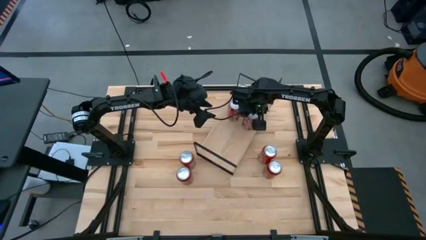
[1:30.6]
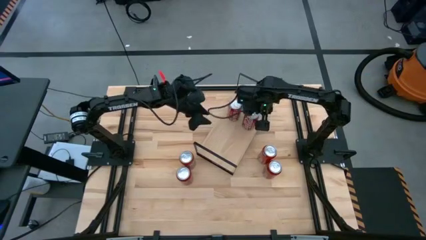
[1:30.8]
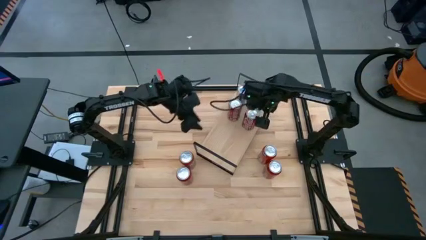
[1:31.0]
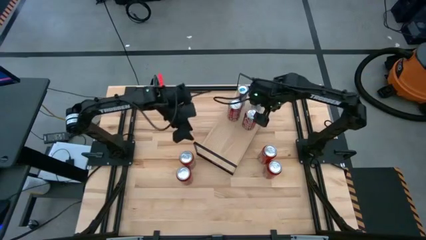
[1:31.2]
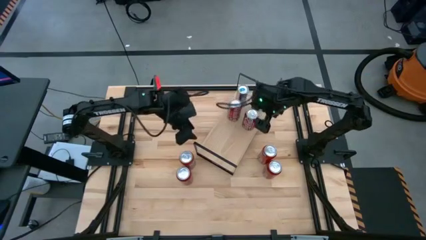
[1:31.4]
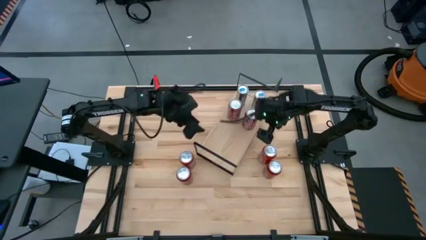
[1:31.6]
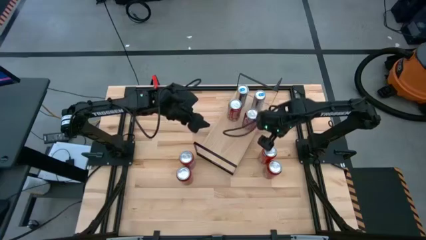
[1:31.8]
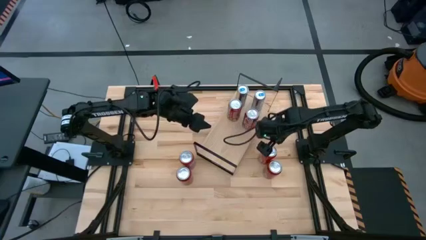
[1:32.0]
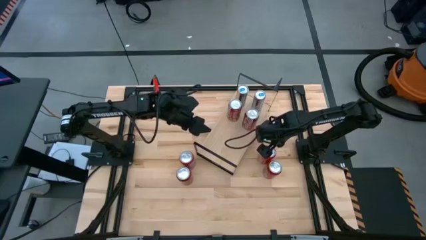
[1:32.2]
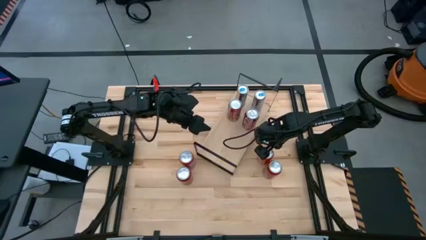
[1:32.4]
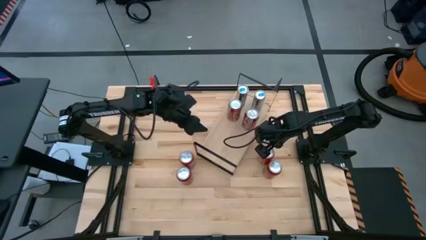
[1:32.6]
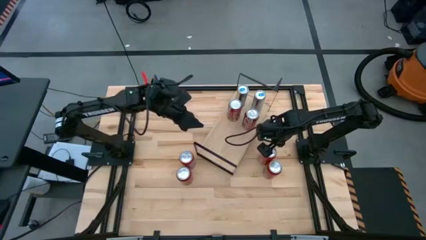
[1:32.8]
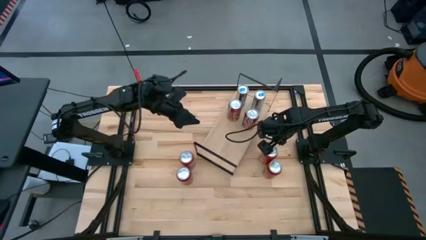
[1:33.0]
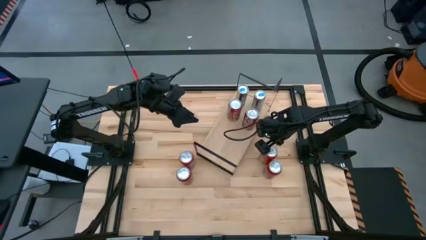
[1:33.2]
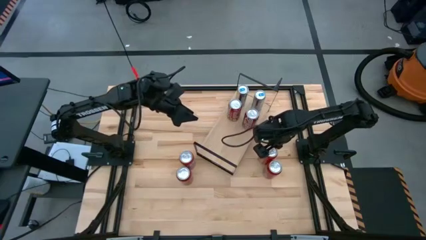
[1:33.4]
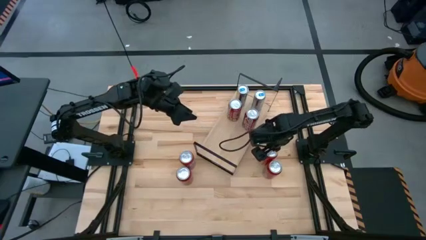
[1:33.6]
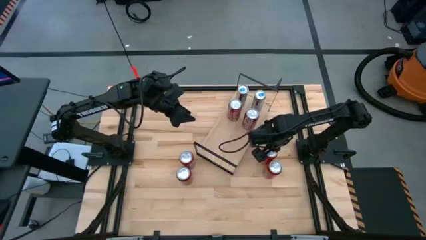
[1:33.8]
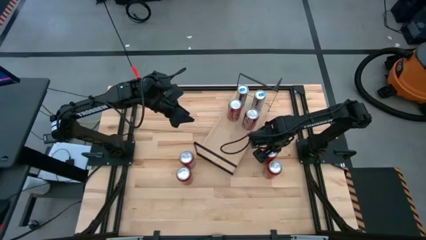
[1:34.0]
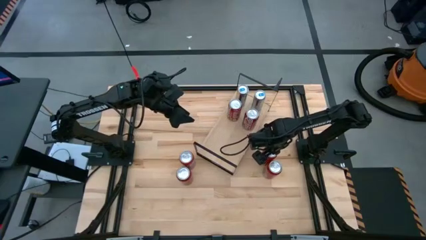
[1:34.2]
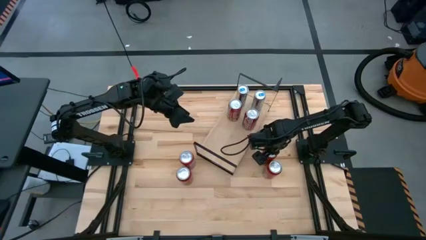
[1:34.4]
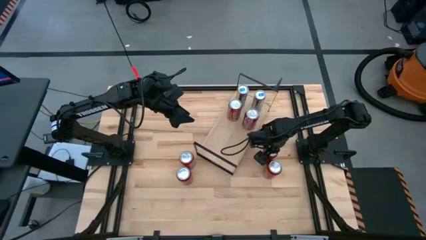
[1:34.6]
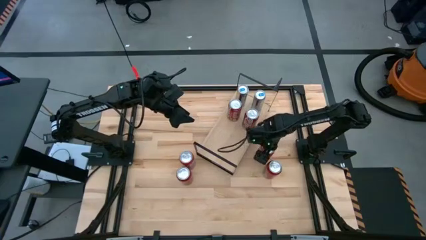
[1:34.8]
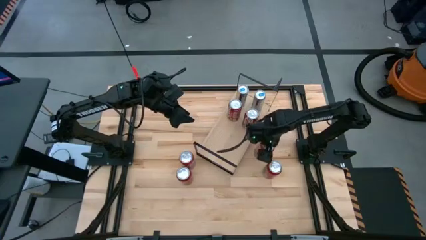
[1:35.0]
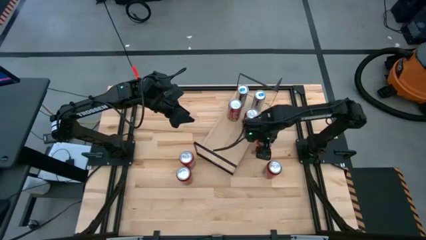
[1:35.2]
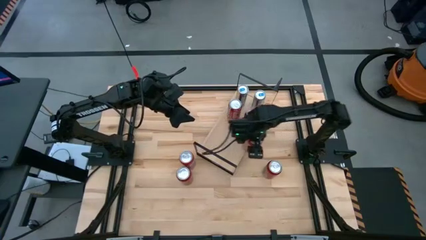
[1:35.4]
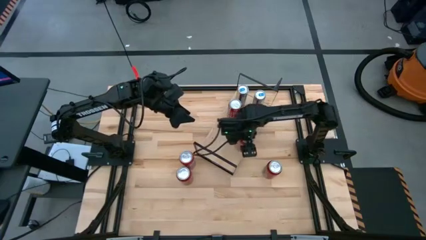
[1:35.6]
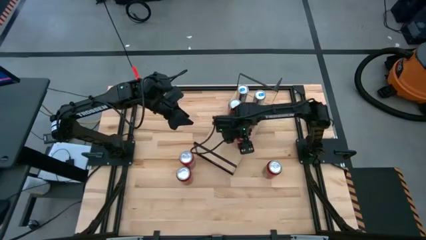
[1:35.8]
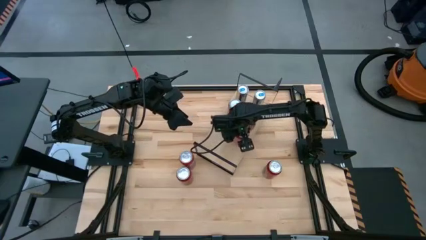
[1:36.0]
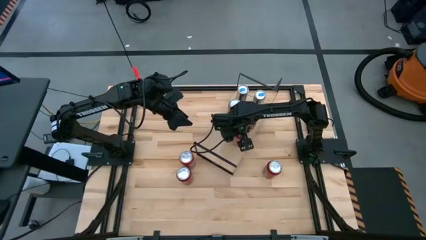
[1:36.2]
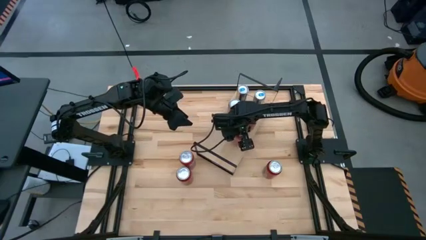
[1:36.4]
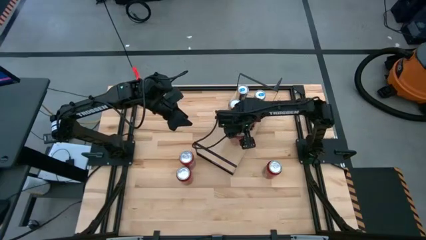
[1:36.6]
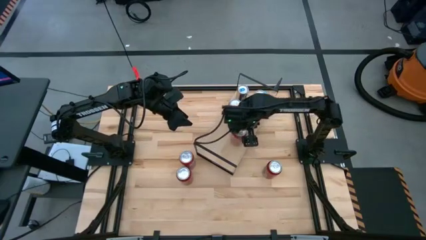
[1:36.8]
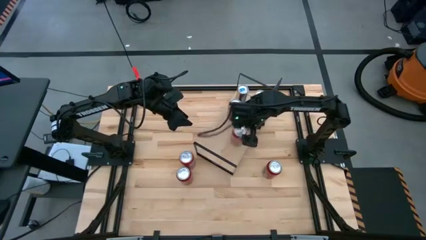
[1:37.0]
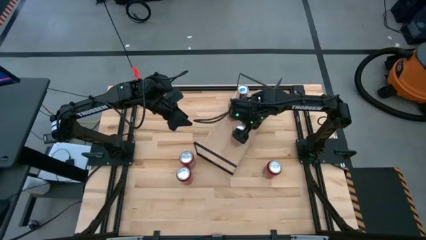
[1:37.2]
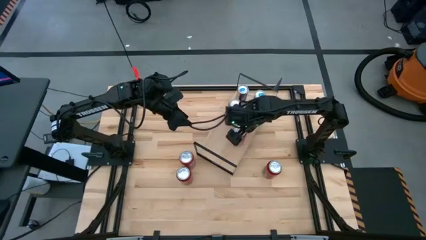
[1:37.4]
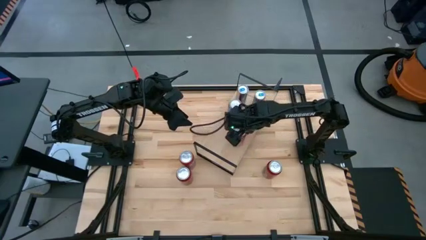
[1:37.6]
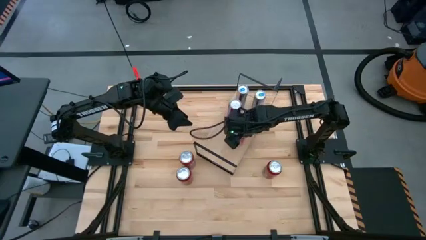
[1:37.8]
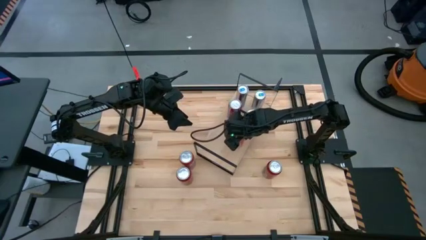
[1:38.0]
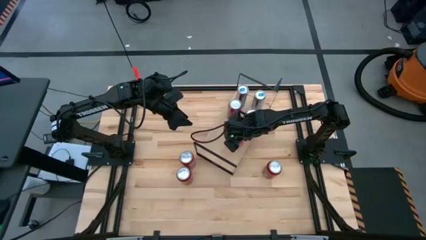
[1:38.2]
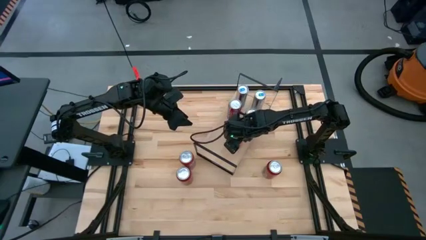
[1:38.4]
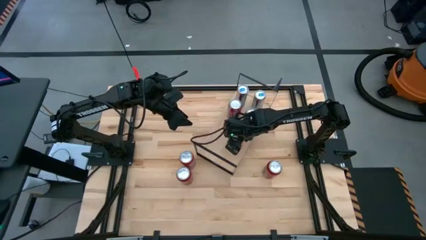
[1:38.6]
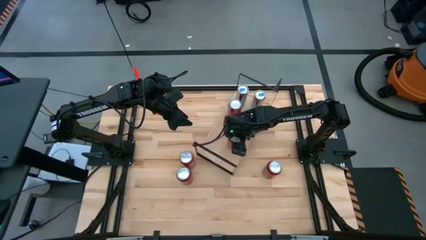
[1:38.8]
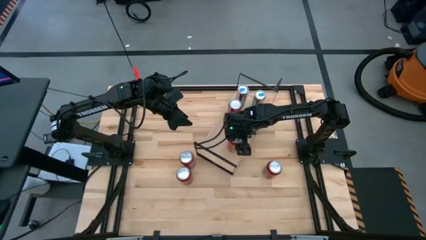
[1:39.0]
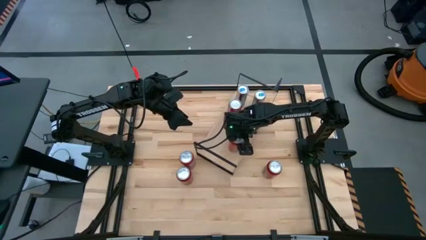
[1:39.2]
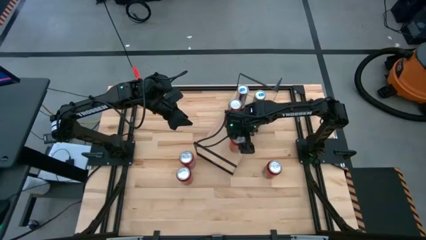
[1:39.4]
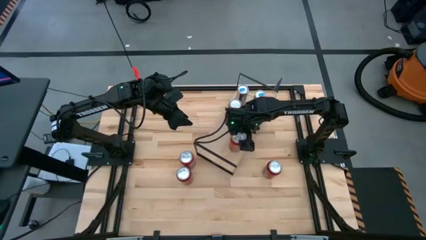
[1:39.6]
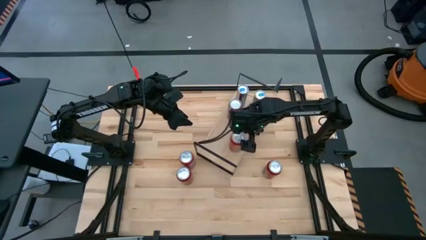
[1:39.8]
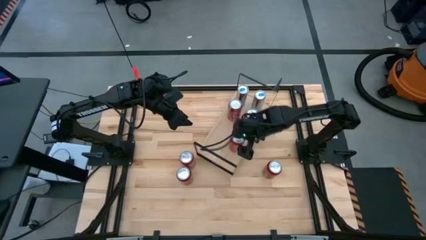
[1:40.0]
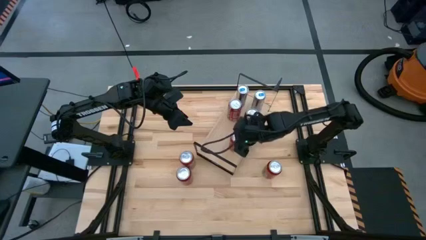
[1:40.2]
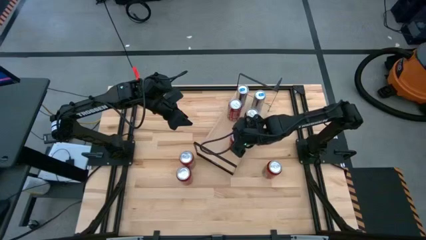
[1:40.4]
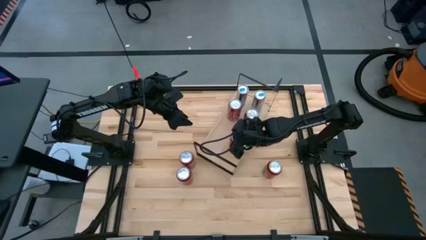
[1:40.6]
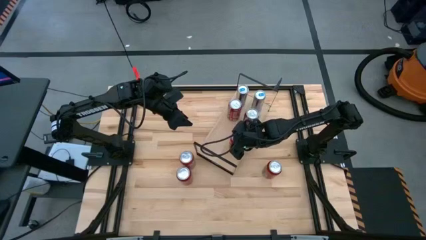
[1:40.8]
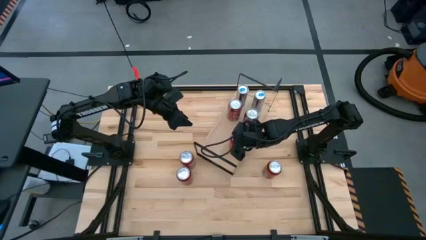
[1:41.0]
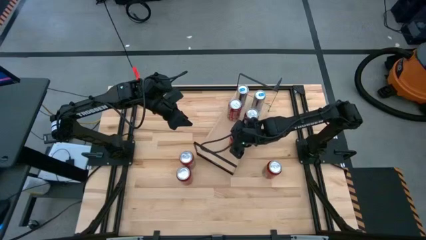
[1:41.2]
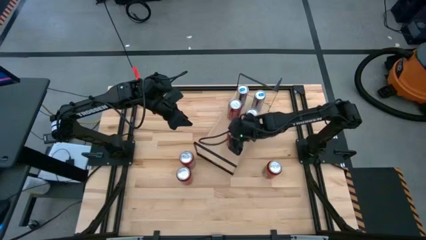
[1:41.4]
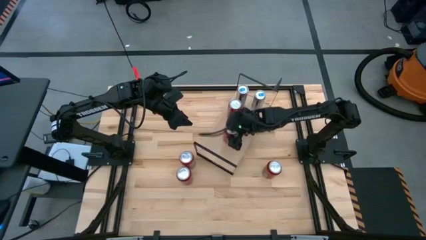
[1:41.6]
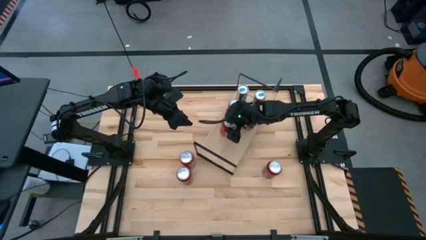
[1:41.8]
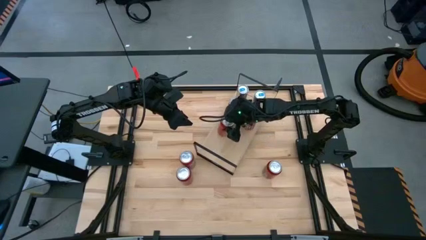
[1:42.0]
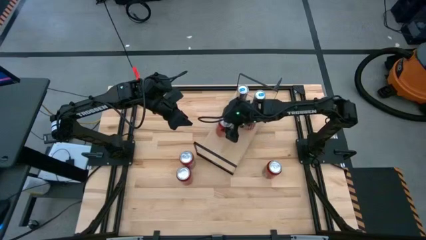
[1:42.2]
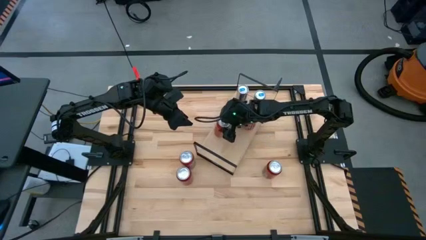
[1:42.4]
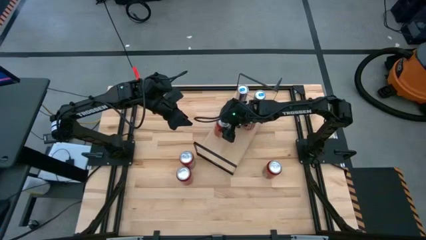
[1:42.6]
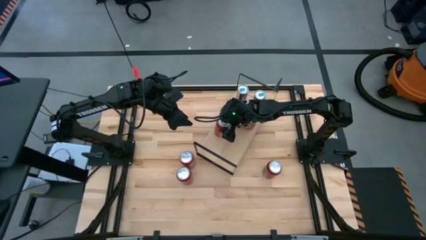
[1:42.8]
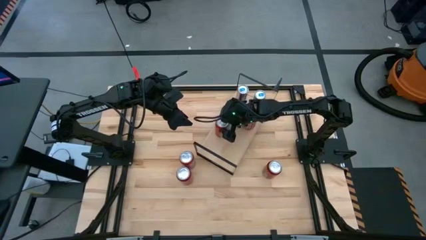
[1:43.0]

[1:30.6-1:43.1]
Task: Place canned beverage on shelf
Put the right red soda can on the shelf

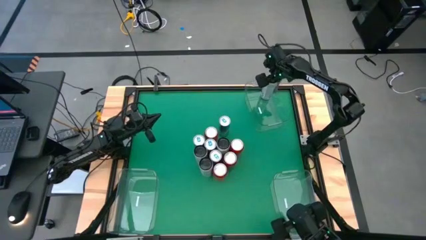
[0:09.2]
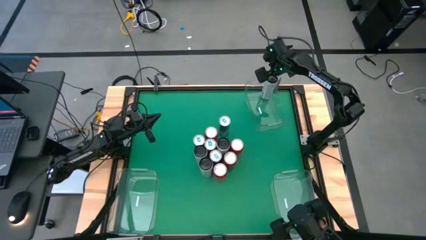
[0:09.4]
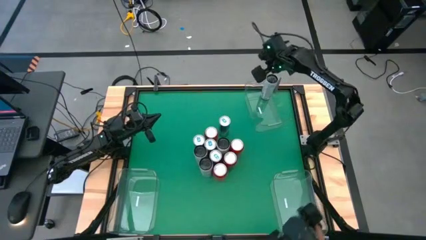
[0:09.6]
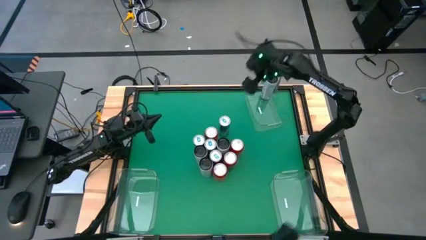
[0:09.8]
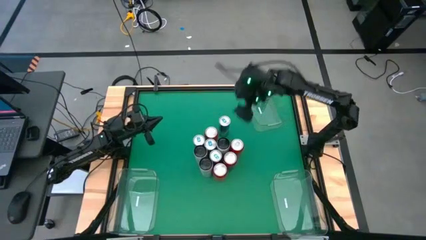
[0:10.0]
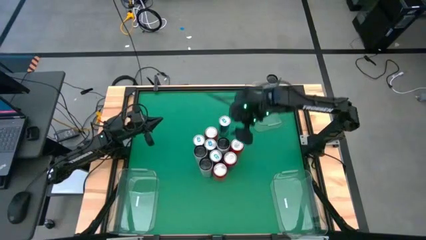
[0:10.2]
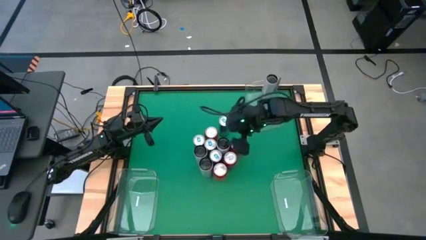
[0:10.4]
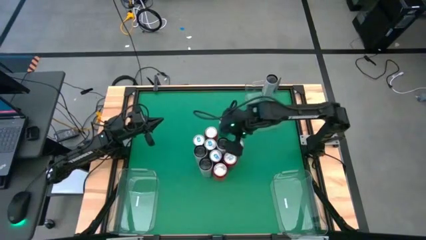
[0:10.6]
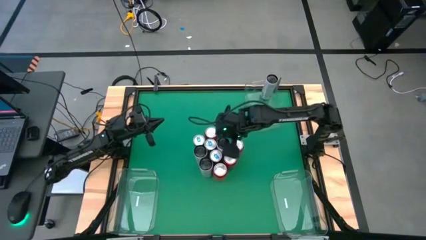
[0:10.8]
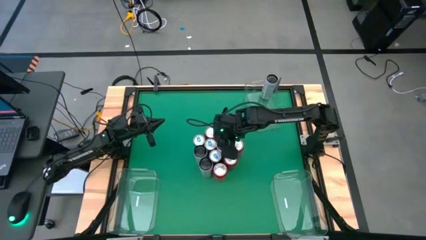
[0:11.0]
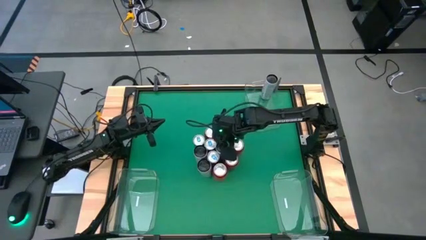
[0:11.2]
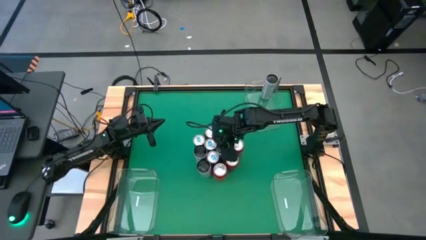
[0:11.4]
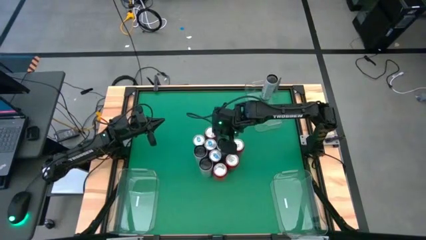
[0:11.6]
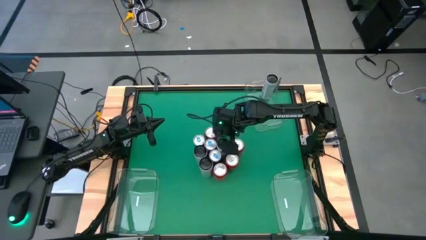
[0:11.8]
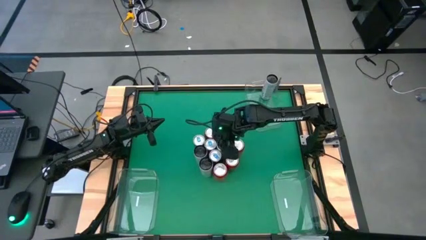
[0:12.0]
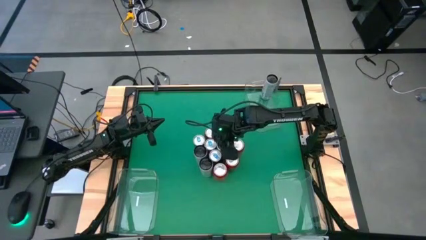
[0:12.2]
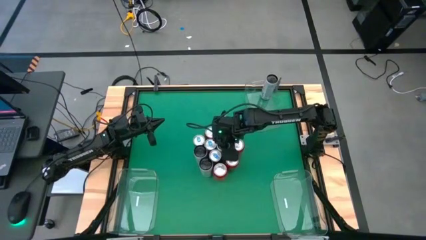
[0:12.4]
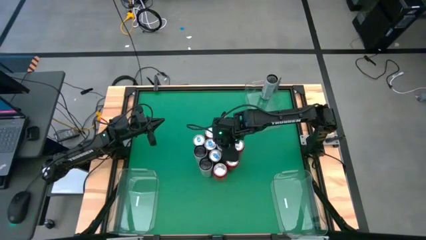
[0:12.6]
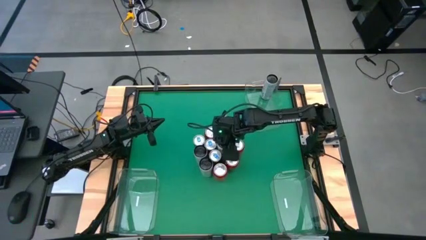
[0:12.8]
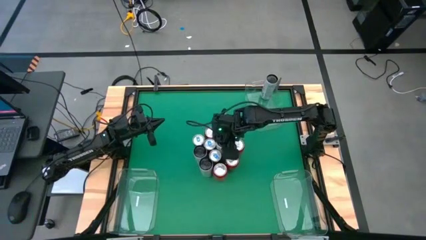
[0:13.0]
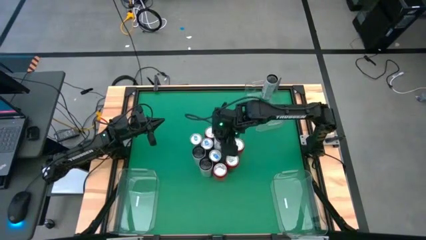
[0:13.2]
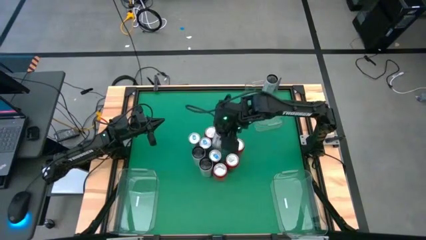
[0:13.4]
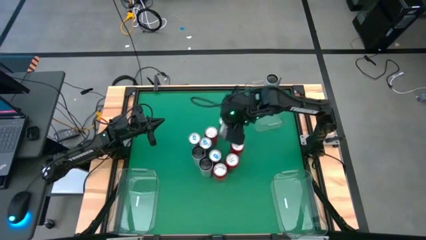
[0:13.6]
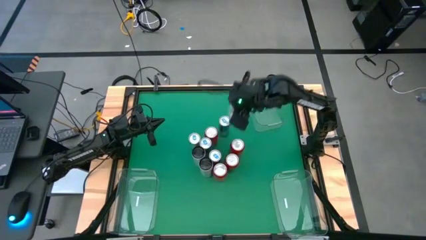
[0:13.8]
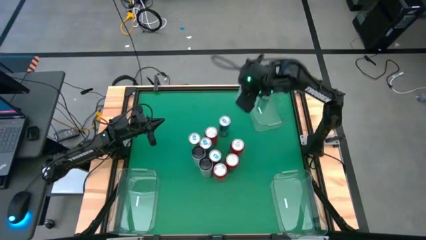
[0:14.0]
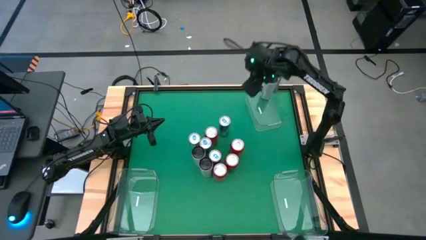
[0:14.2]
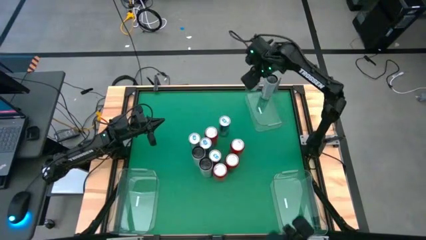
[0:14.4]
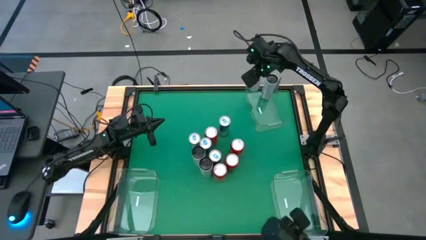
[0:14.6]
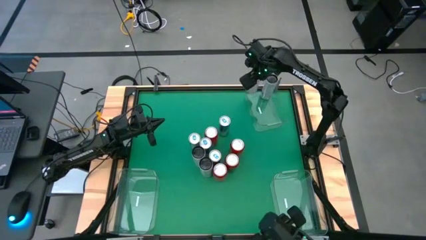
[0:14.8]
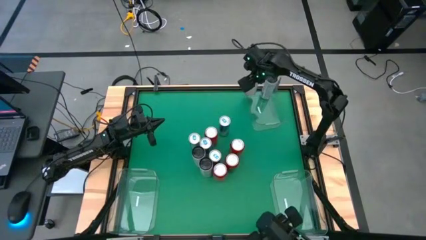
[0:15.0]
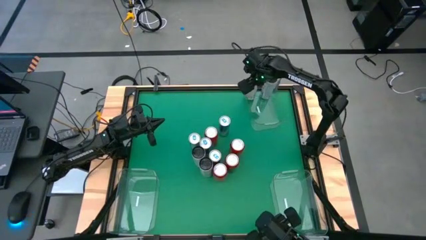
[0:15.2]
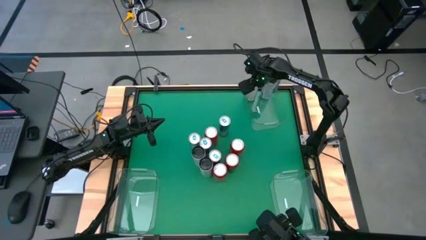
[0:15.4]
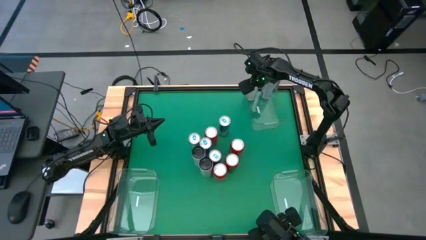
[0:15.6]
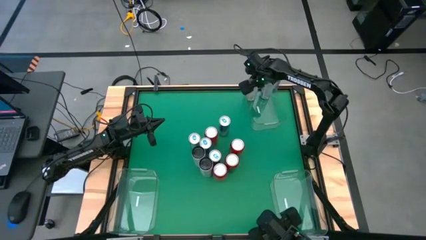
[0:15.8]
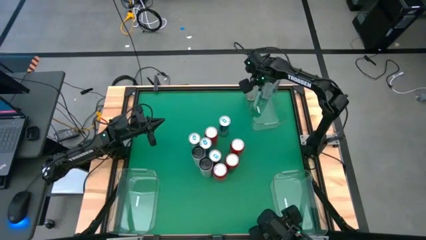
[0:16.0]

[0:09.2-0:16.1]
Task: Sort soda cans
Put the white and yellow soda can into the top transparent bin
